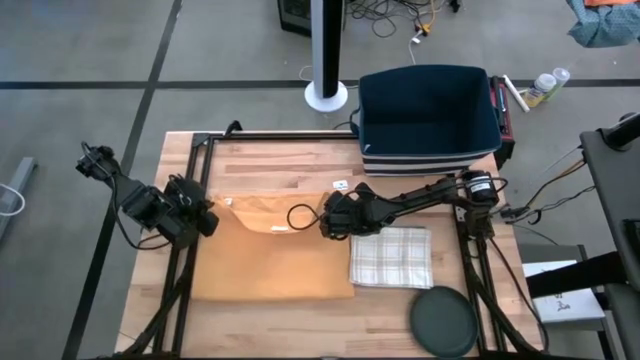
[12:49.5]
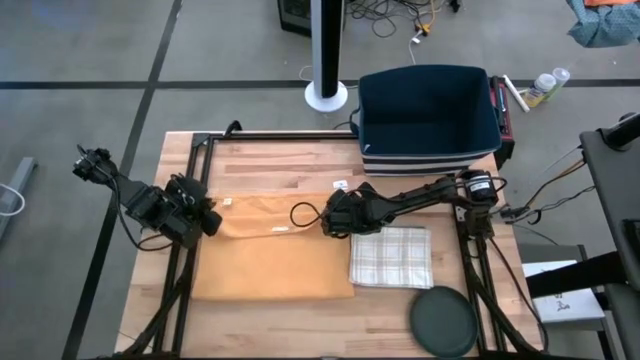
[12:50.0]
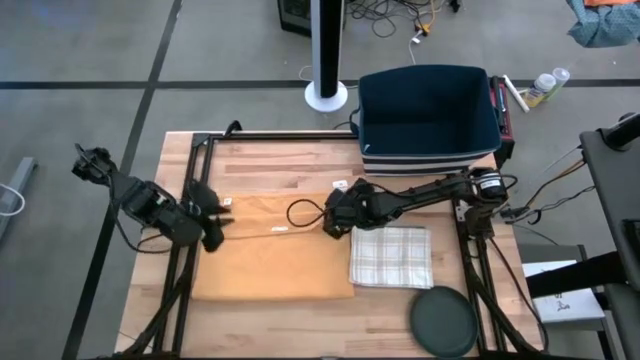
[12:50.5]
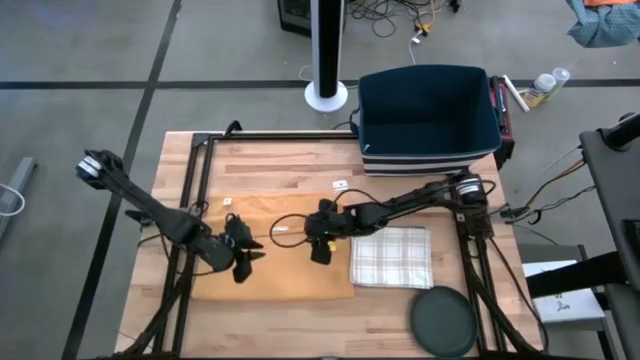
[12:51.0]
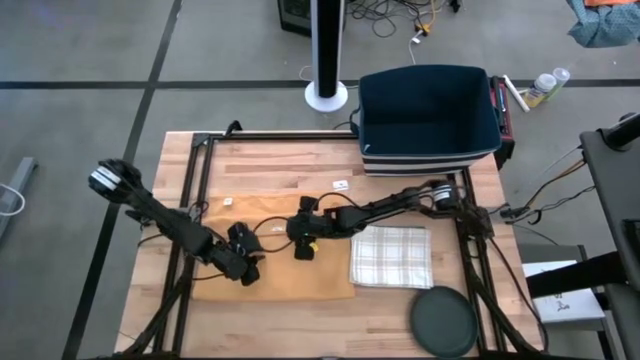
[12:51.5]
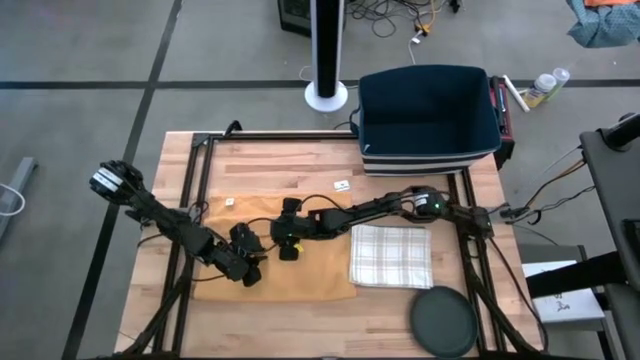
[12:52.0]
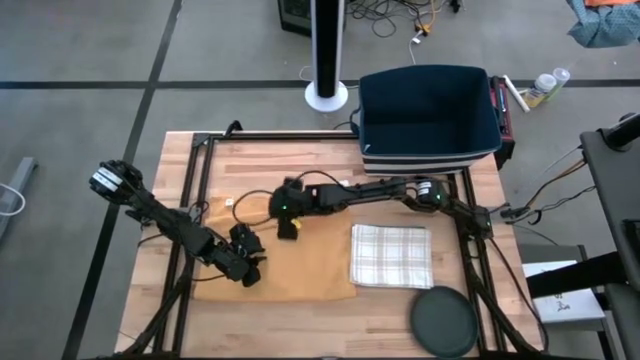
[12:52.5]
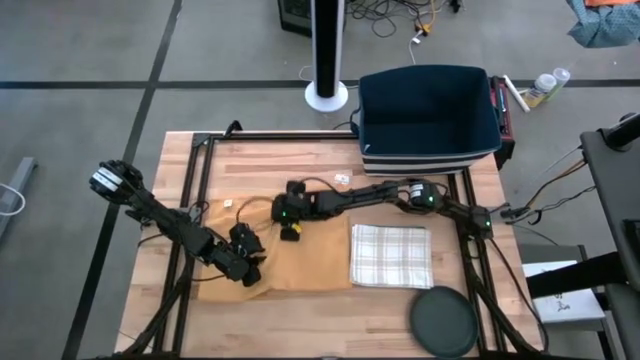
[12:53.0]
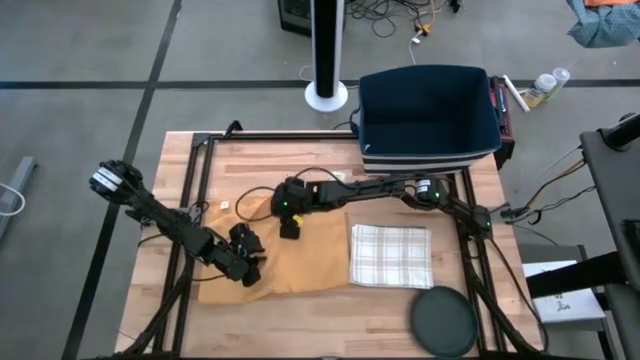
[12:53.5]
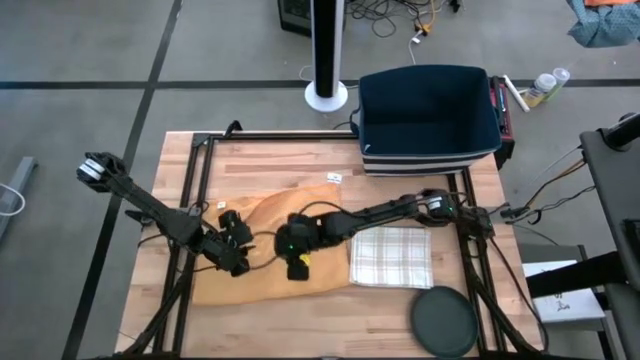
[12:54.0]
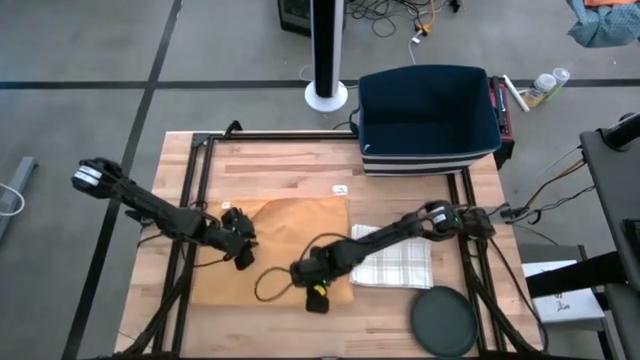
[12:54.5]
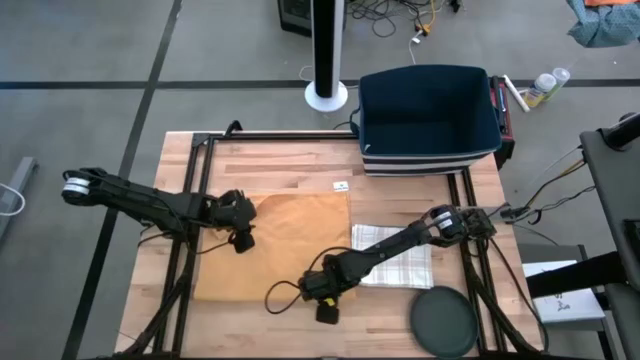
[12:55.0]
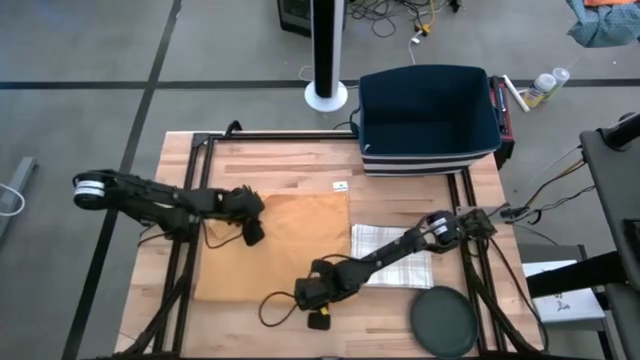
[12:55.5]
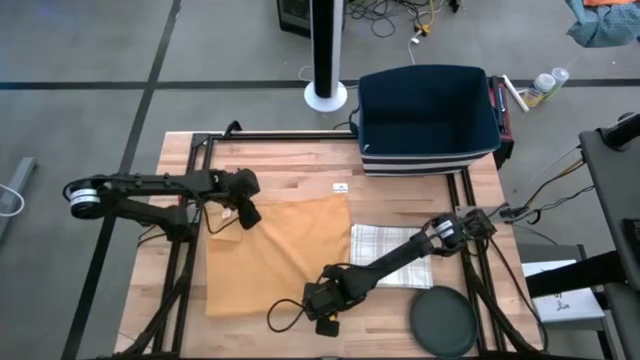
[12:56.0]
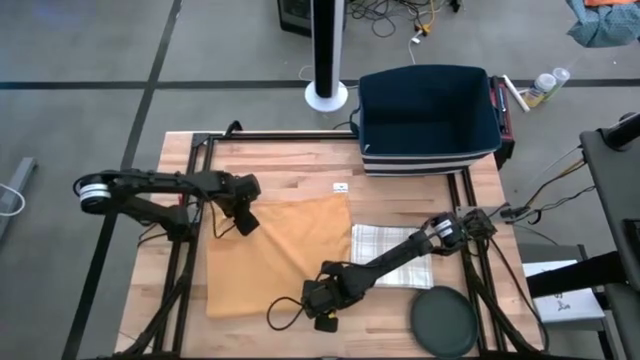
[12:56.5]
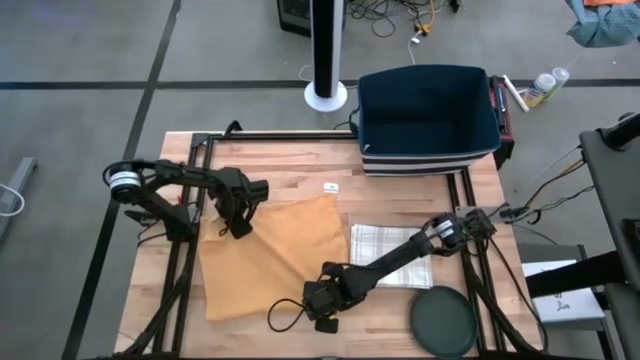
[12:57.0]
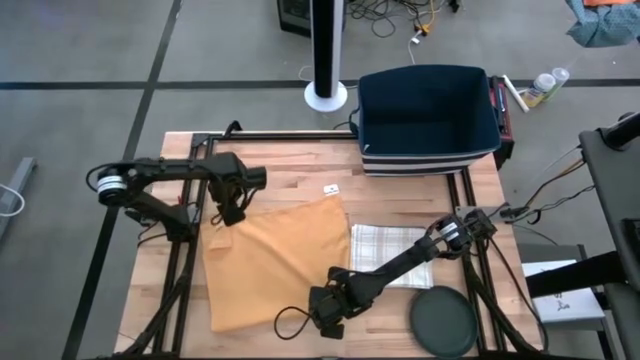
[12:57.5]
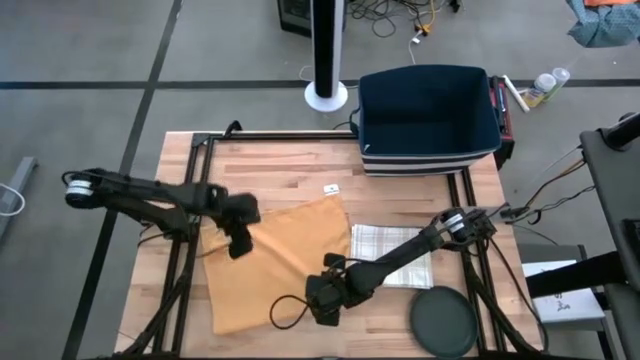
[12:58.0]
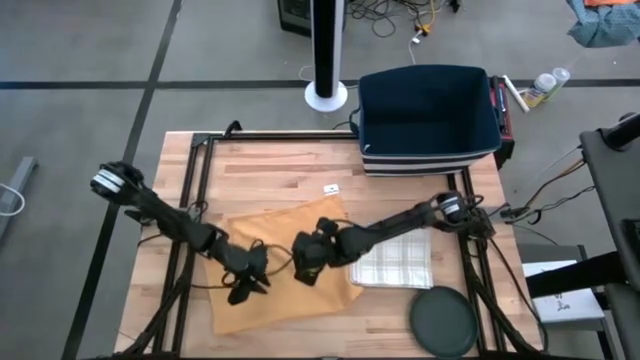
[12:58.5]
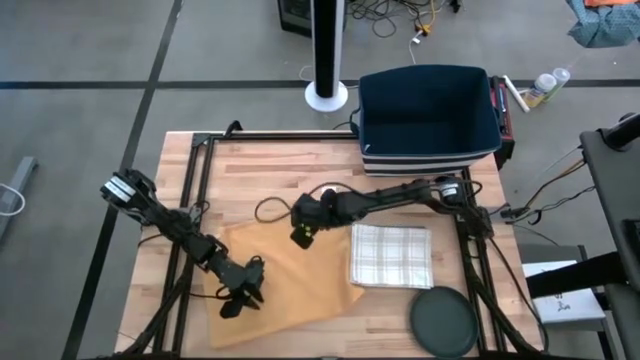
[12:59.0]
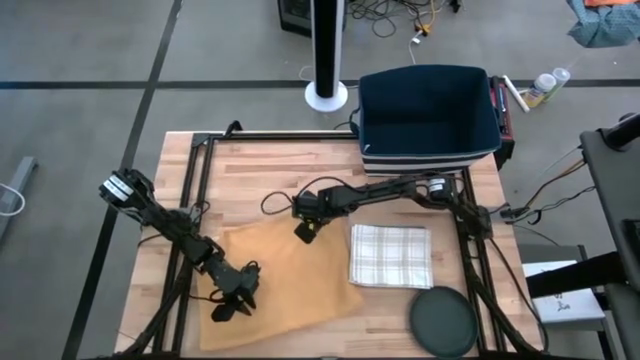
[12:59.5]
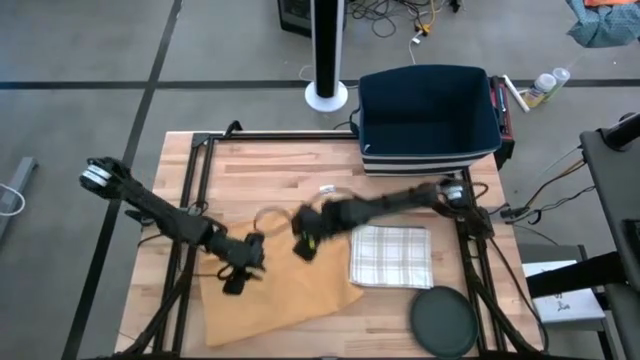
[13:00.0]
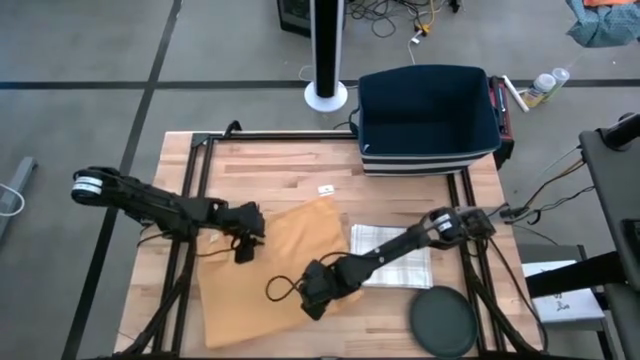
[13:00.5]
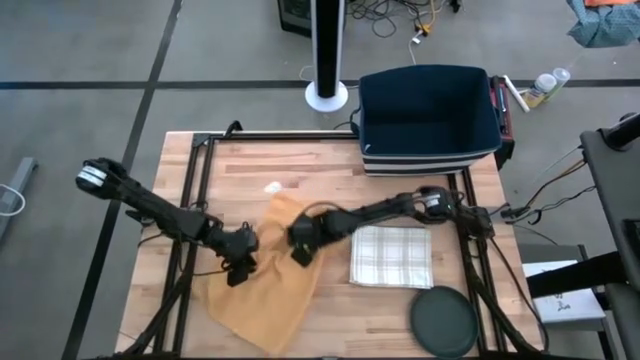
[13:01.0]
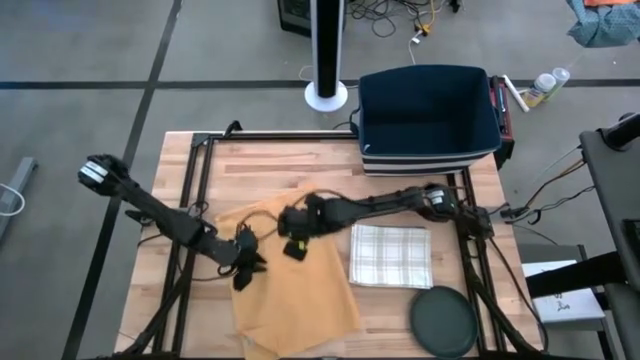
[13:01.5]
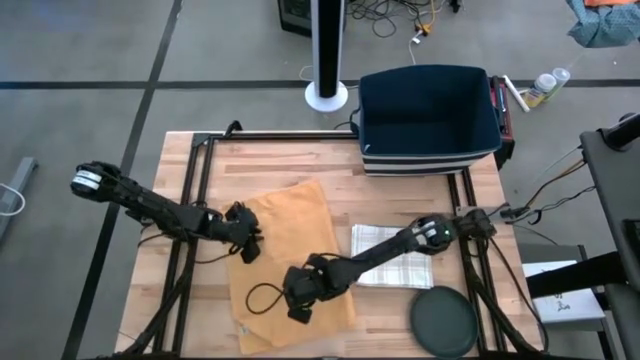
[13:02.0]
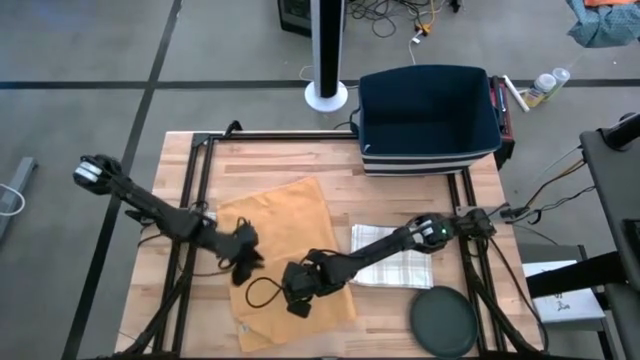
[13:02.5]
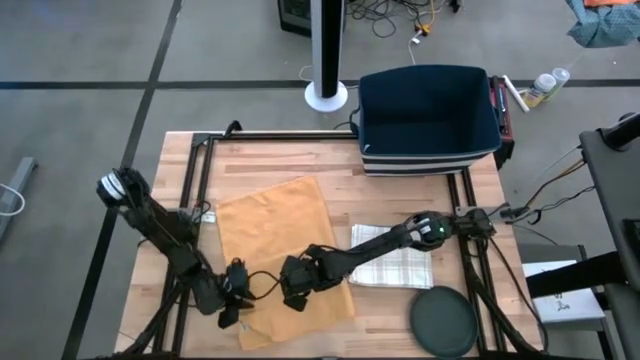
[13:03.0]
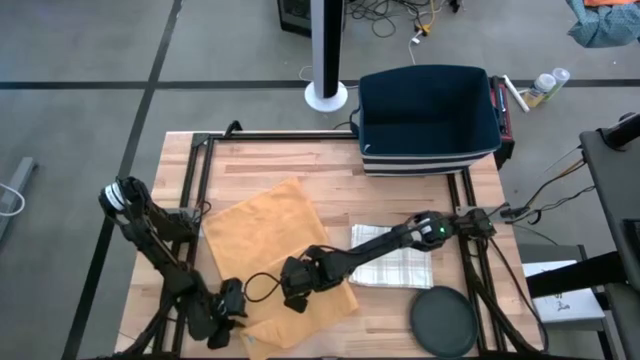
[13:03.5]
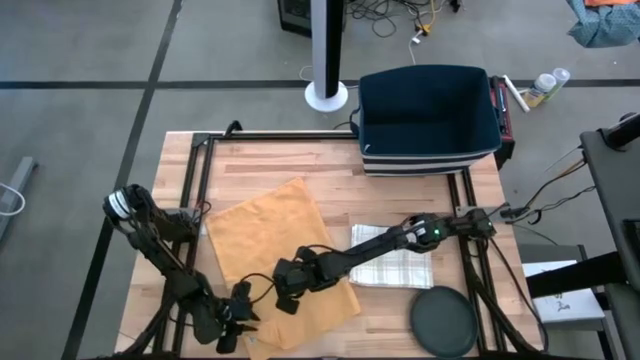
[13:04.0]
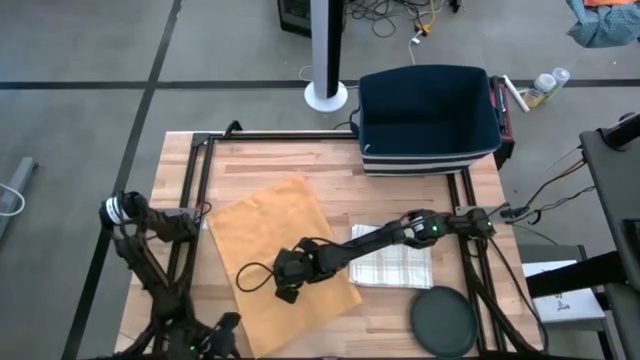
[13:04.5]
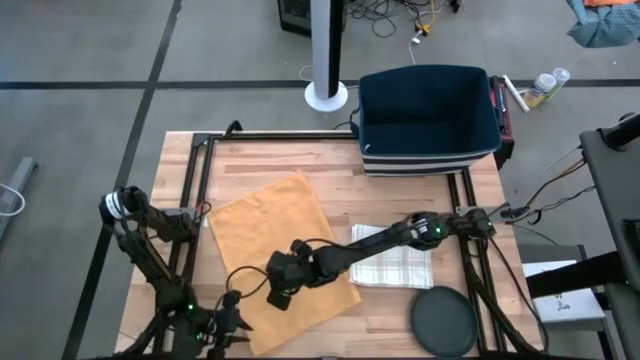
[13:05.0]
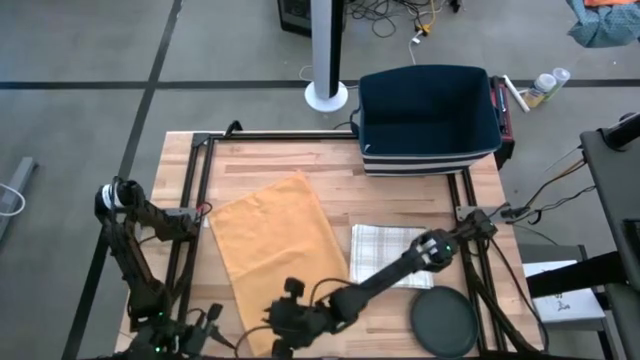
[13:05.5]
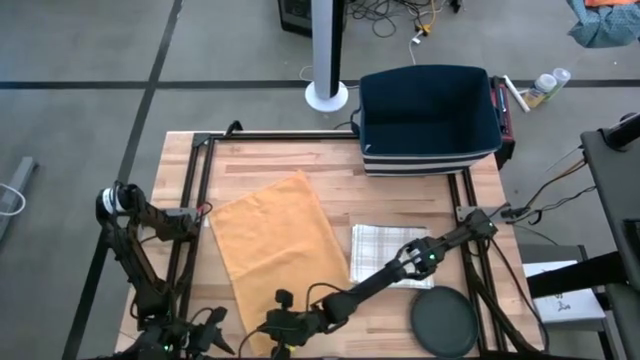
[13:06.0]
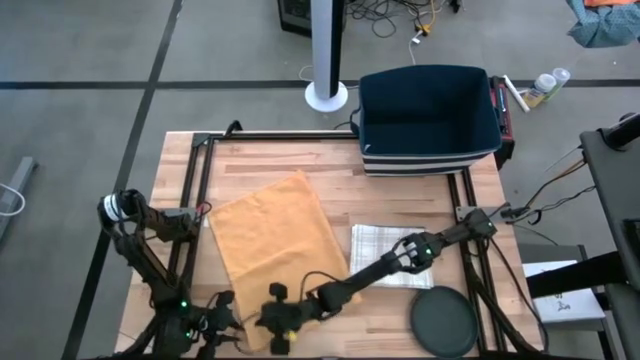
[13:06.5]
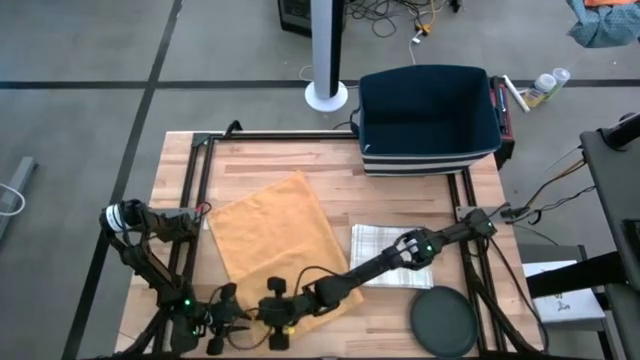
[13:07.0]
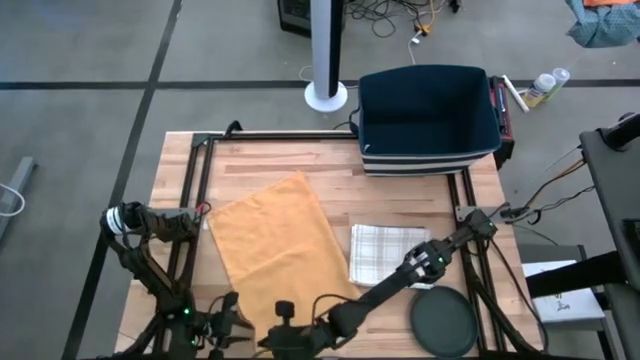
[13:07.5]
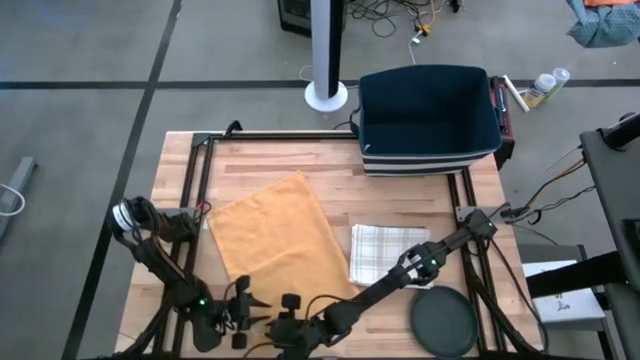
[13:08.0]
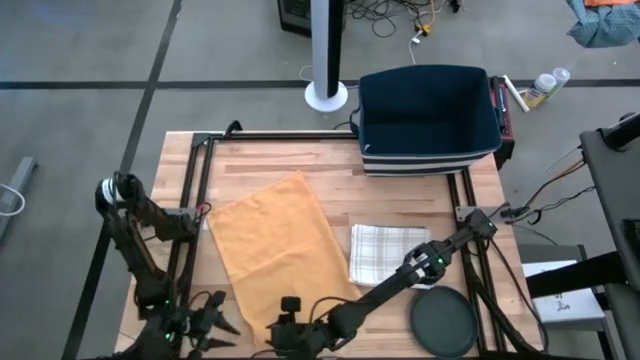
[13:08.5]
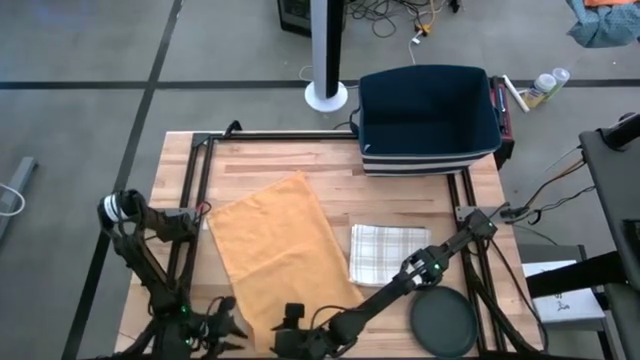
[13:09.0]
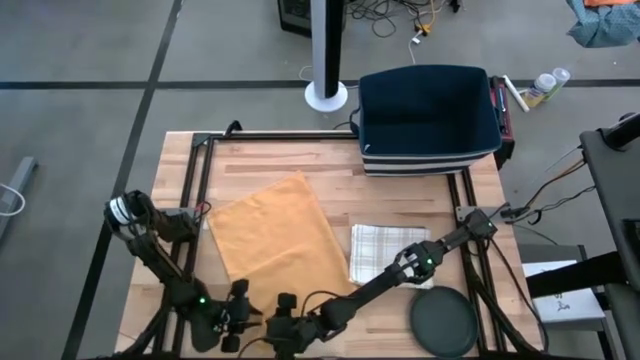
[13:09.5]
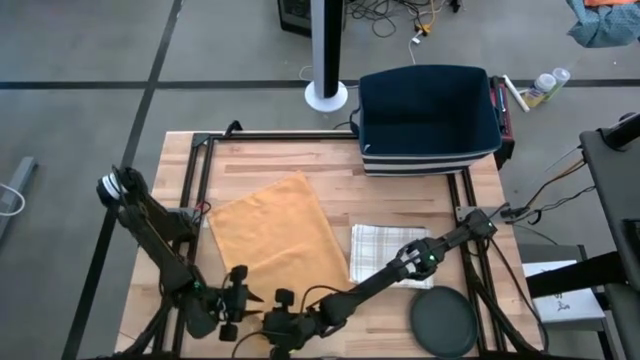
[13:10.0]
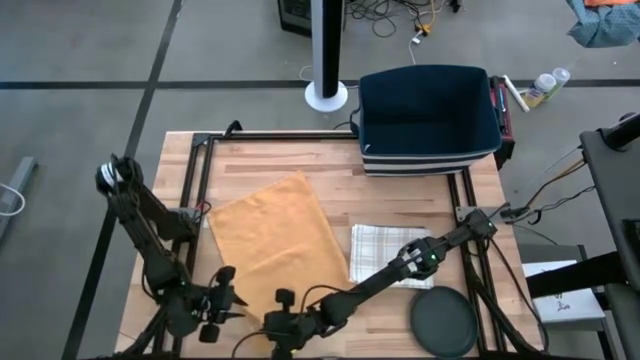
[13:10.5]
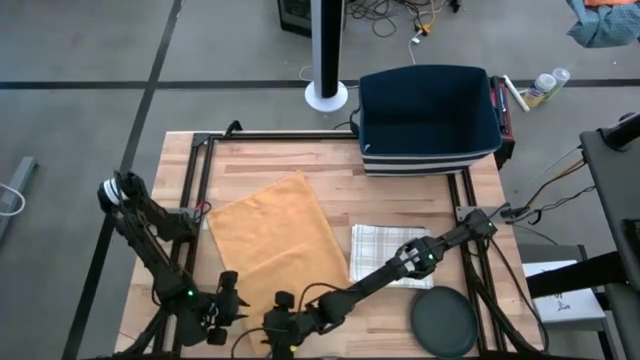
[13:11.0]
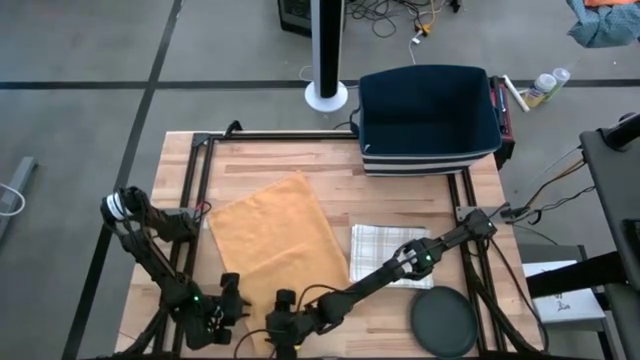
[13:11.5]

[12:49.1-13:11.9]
Task: Fold kitchen towel into neat rectangle
Fold the orange towel
